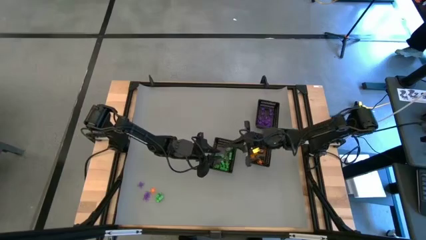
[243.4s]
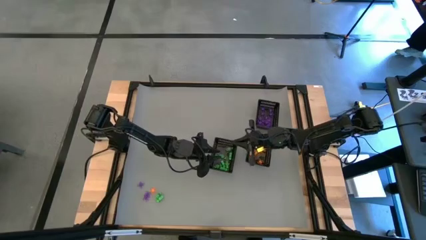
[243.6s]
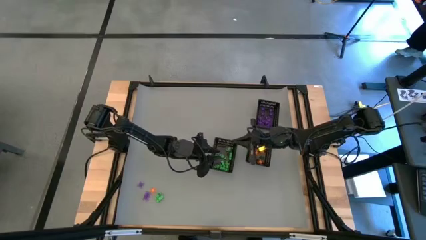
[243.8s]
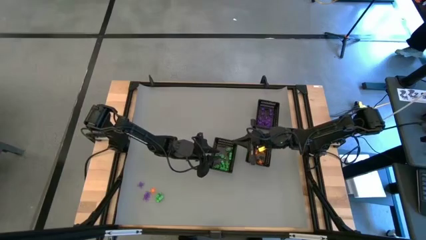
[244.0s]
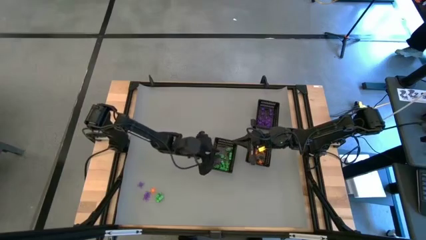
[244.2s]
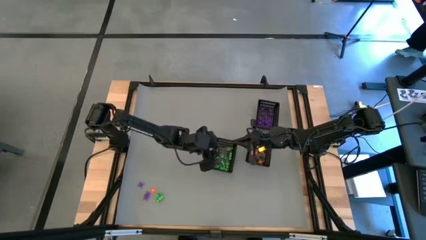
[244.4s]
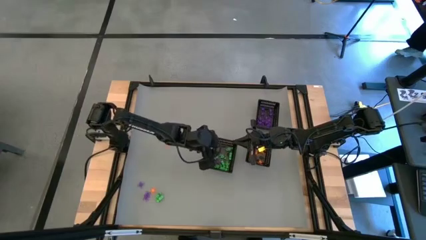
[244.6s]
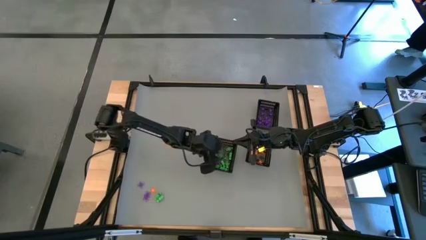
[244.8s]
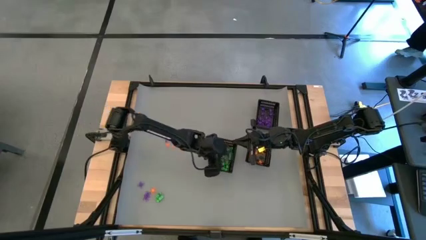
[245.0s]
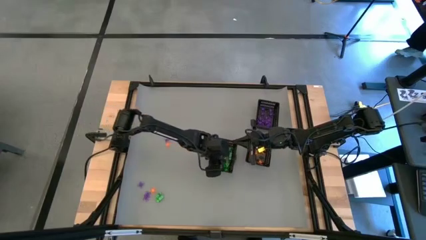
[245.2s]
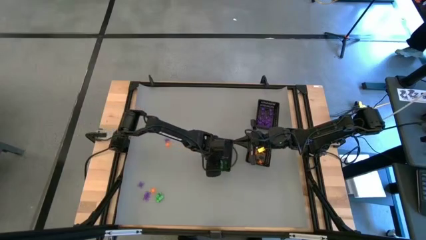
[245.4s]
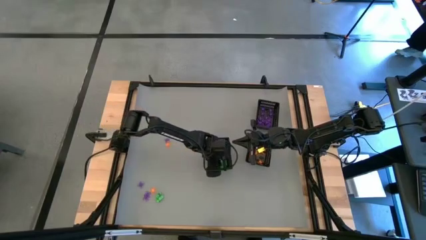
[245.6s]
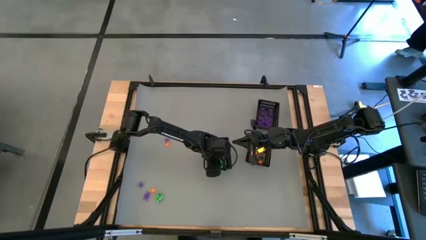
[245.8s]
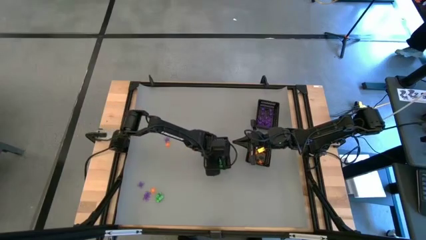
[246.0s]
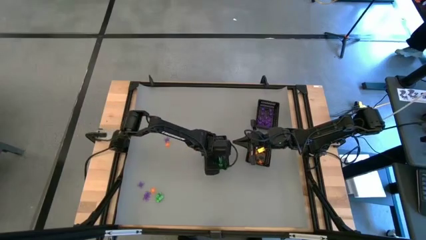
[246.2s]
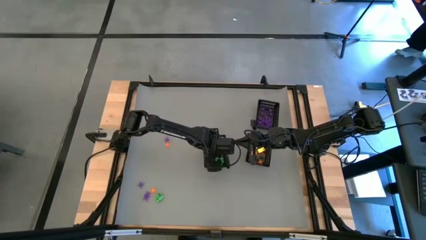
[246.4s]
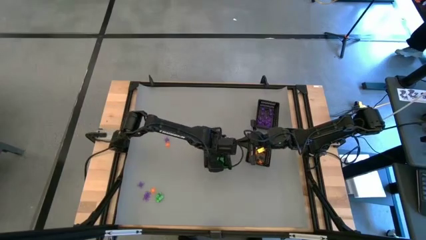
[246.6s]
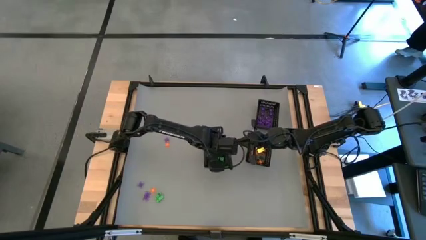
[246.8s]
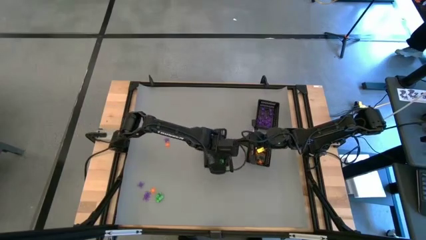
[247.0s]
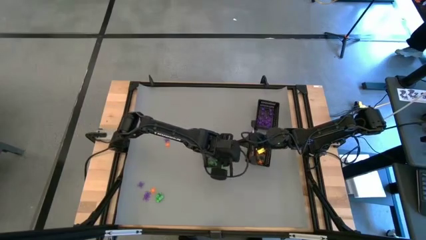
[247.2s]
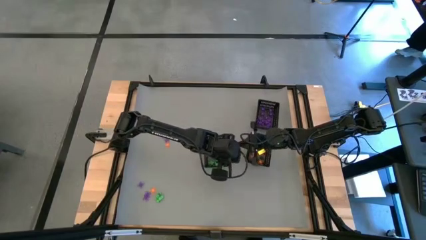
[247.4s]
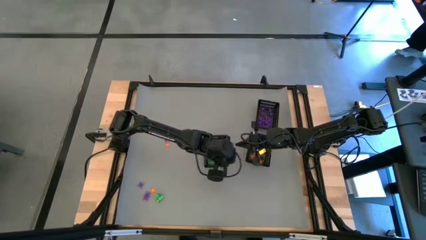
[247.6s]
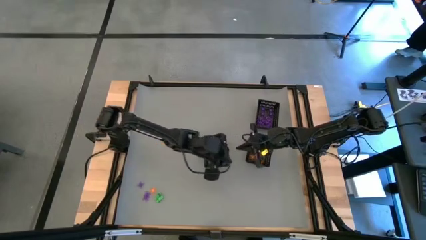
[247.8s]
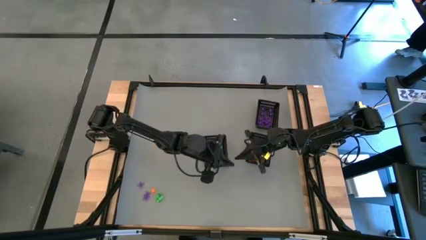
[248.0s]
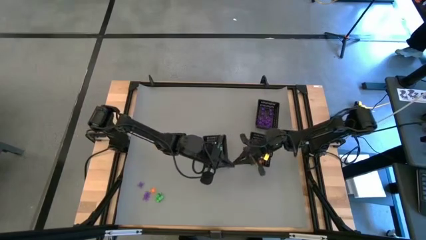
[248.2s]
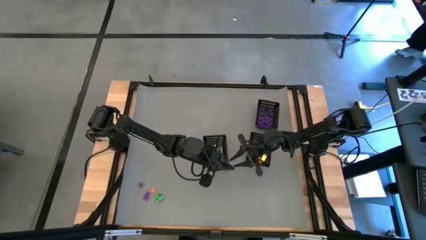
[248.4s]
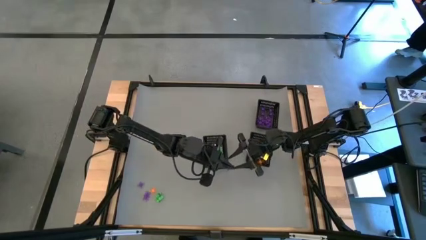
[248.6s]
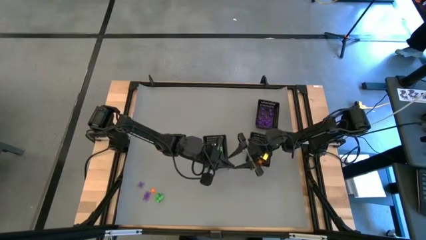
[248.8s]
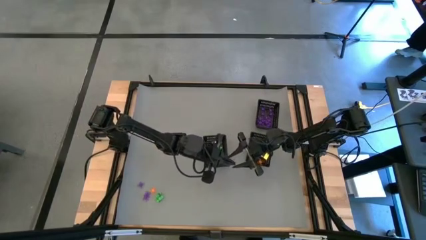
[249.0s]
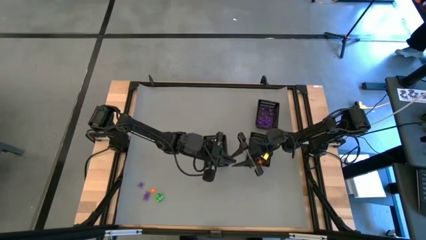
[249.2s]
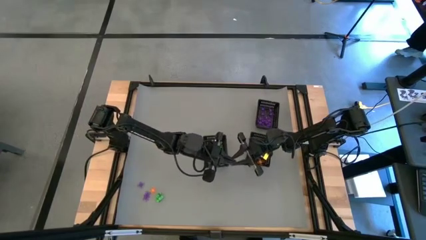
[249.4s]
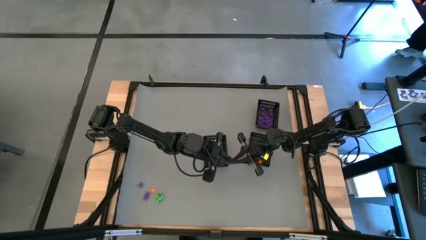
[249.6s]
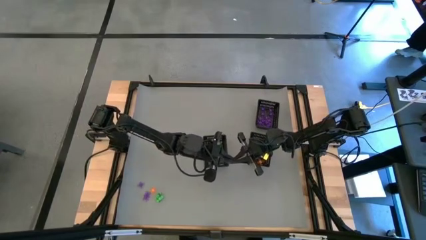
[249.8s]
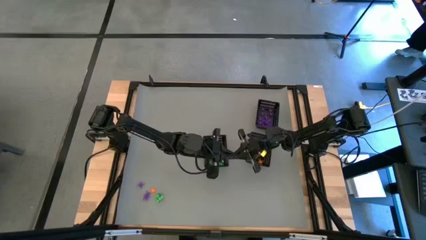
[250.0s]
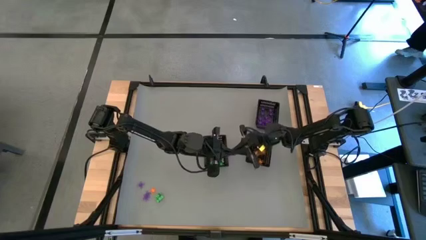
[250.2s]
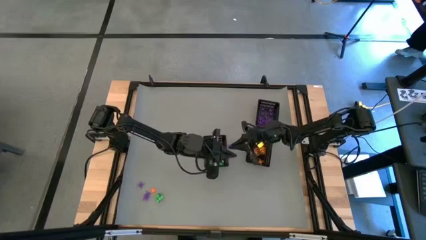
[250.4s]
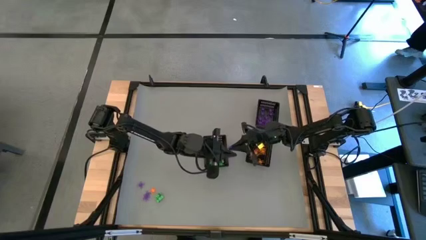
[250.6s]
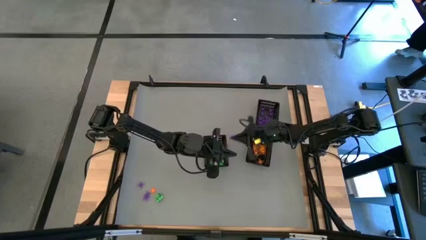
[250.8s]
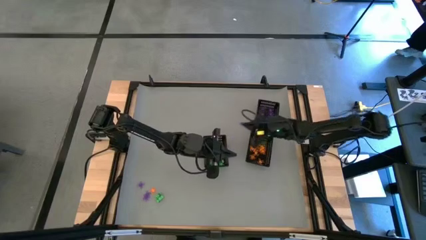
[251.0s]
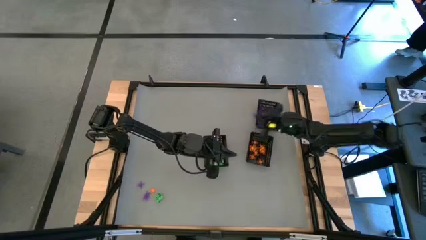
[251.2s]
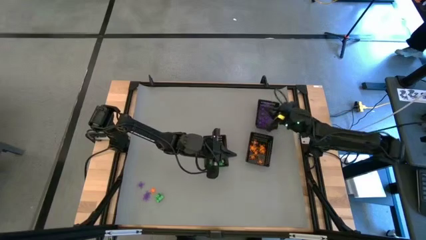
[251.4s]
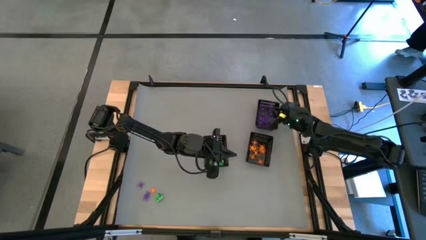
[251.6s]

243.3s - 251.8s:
Task: Sort Halloween decoration
Put the purple spider toy into the top bin

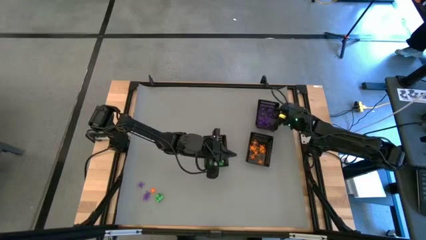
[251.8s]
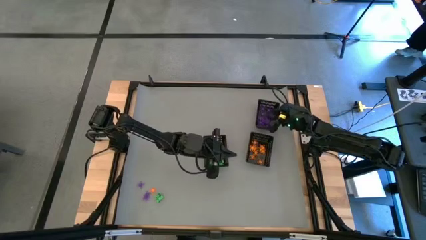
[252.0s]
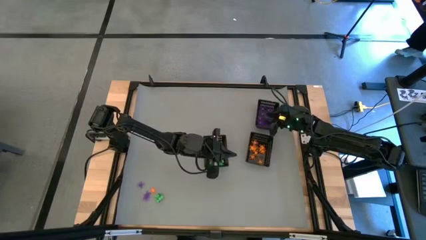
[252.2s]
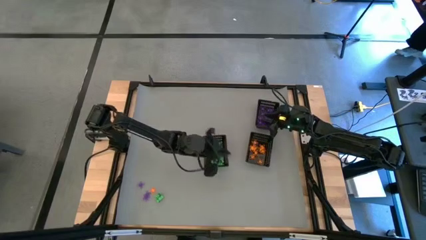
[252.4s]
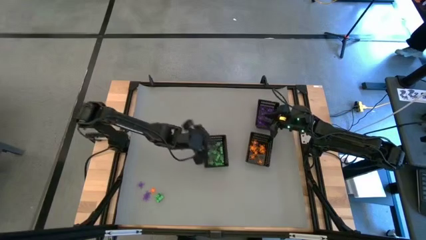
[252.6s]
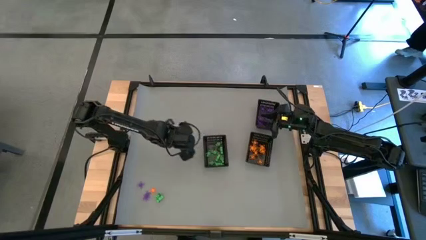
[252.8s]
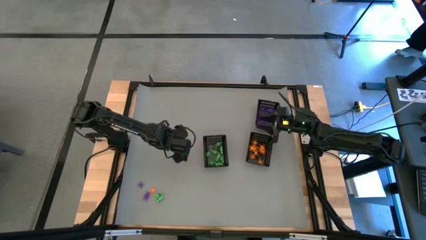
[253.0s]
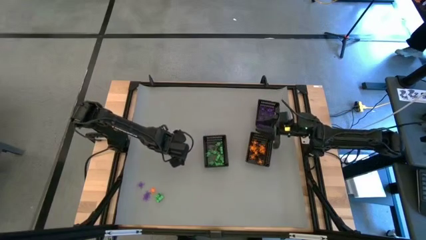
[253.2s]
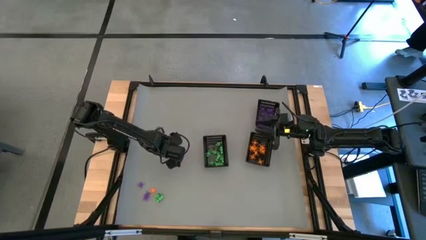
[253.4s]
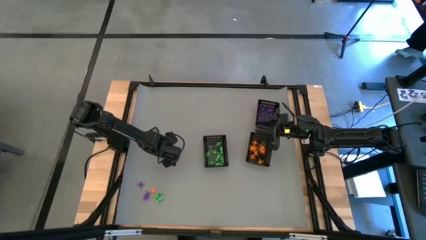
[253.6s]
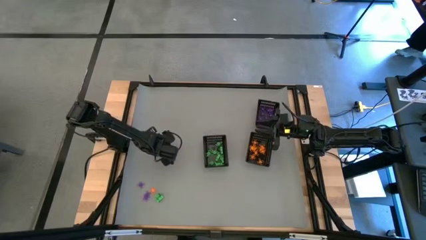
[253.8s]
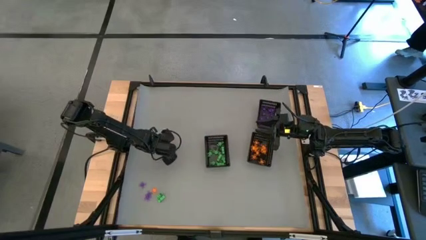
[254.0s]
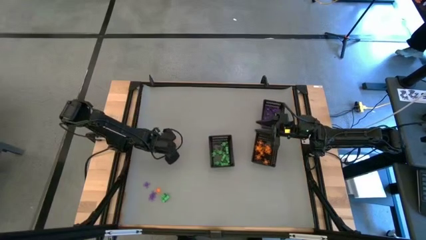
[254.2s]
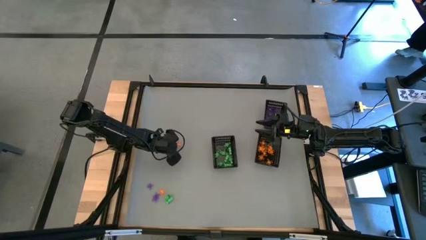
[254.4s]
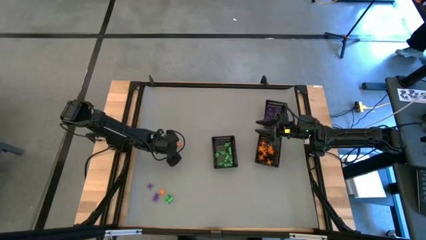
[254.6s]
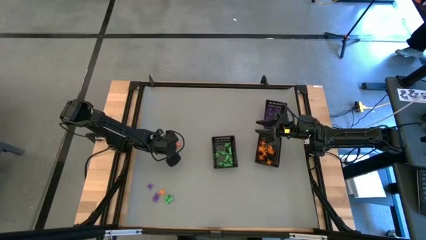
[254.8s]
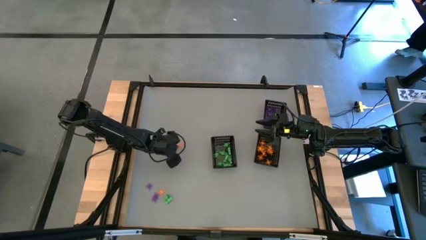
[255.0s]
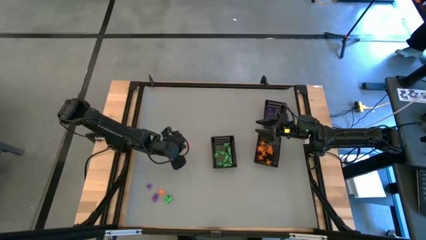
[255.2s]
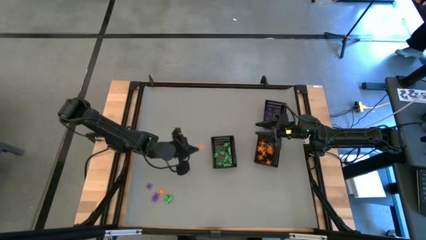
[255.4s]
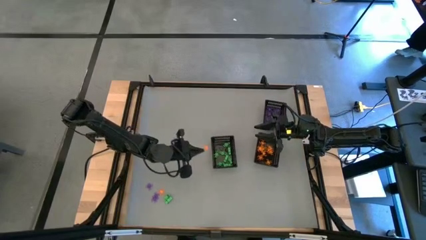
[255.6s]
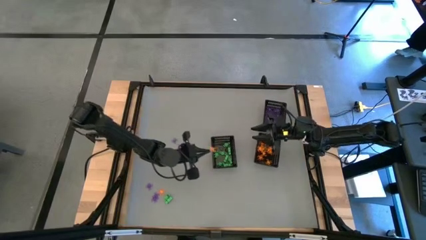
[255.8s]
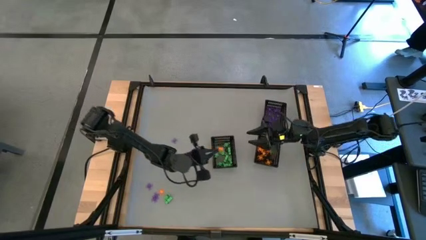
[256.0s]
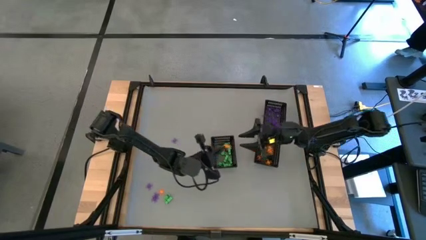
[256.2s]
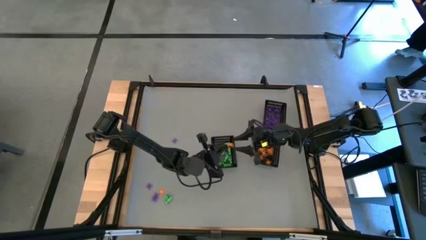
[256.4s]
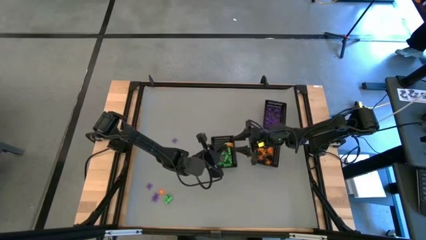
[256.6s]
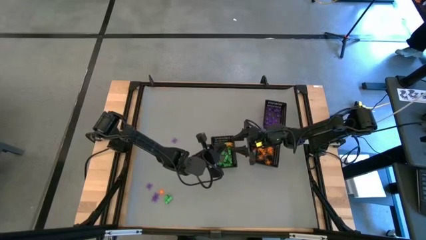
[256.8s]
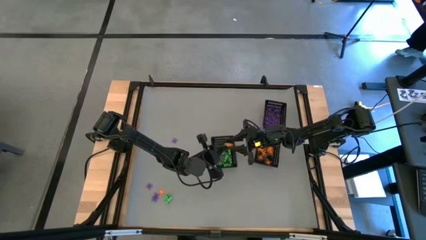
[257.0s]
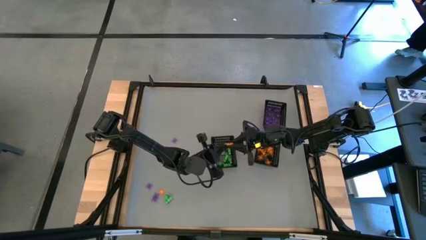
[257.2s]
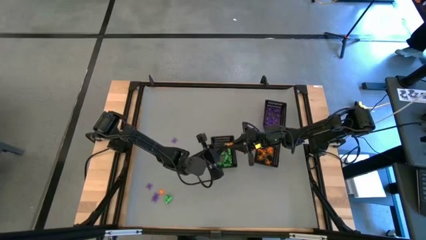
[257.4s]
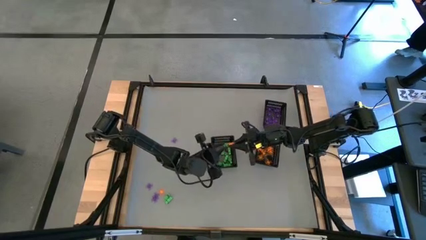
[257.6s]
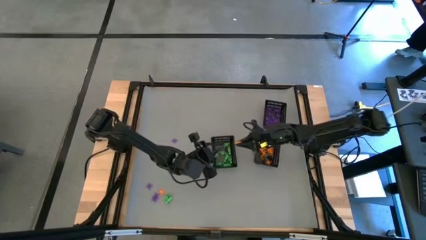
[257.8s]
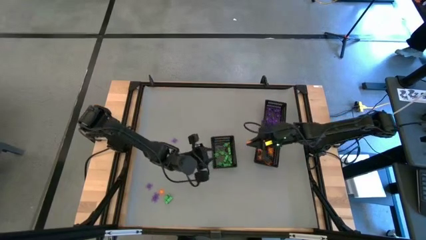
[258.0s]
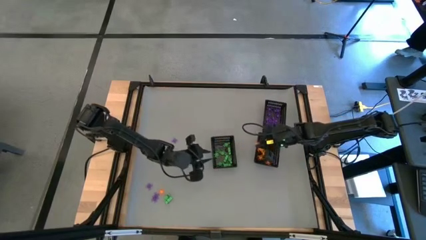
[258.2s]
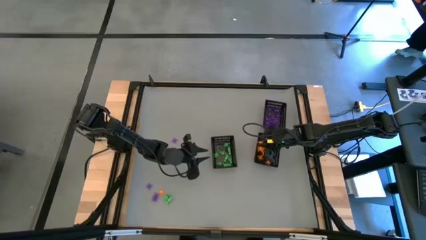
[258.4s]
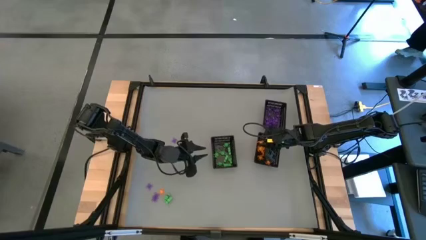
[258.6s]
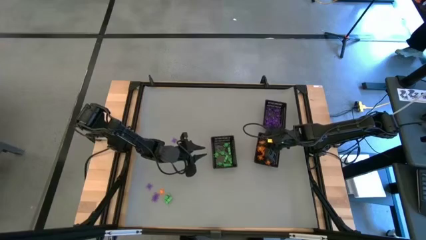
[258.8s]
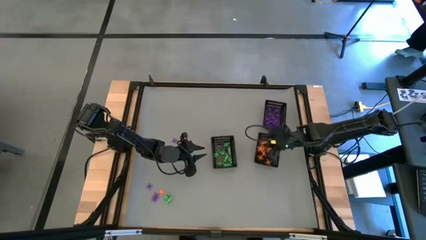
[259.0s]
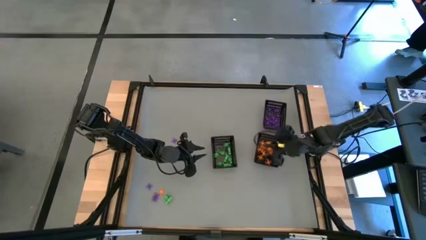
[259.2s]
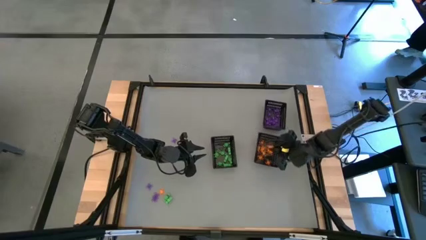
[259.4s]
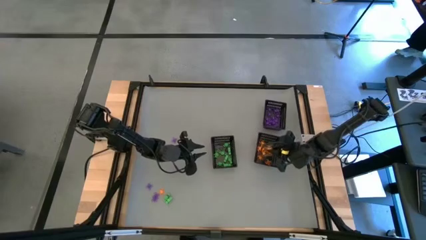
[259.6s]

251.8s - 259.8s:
Put the top orange spider toy into the bottom right bin
